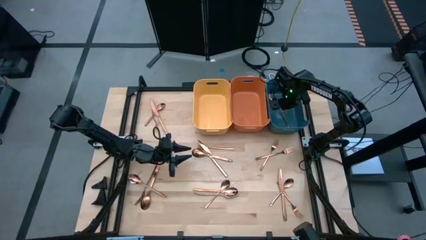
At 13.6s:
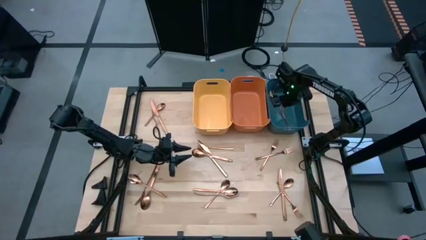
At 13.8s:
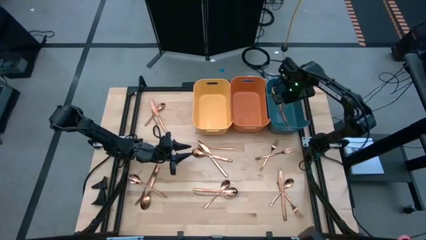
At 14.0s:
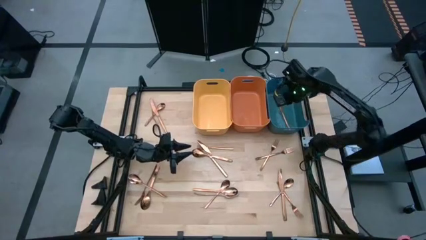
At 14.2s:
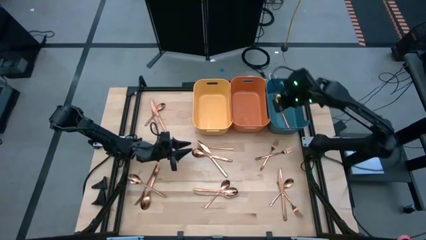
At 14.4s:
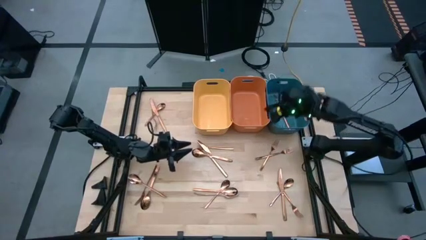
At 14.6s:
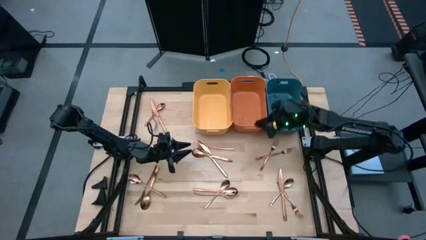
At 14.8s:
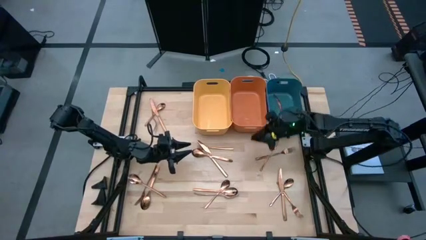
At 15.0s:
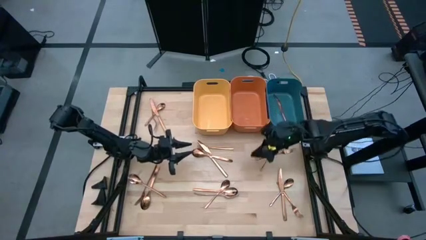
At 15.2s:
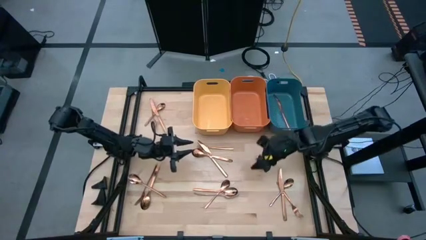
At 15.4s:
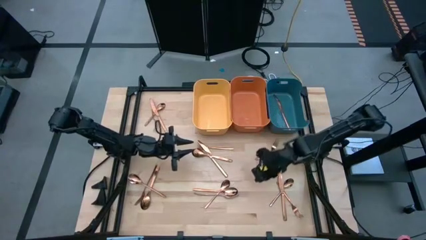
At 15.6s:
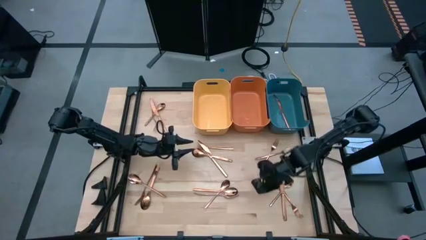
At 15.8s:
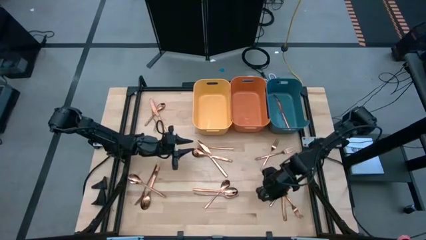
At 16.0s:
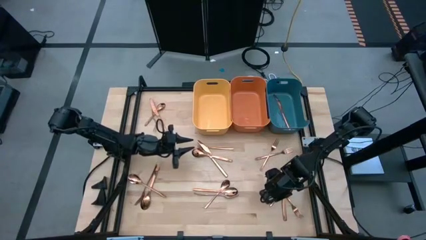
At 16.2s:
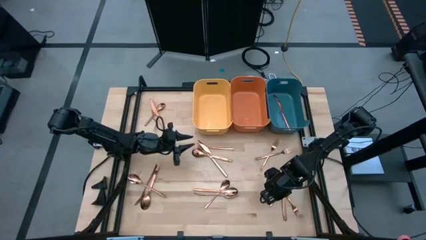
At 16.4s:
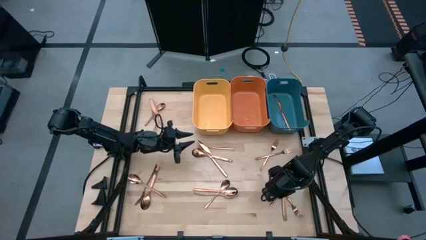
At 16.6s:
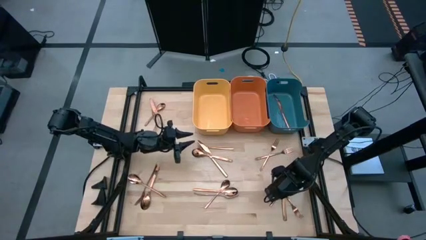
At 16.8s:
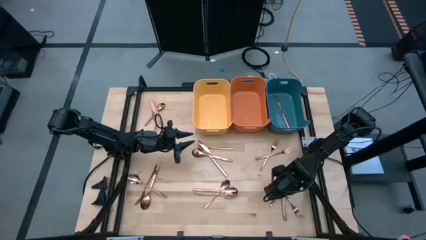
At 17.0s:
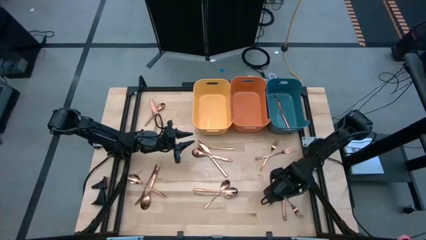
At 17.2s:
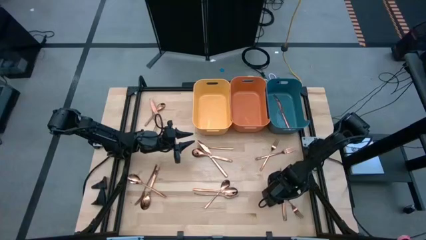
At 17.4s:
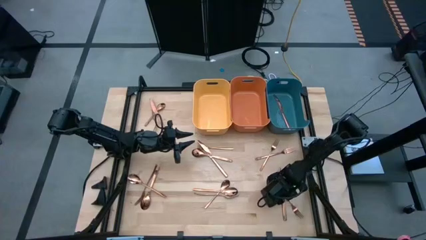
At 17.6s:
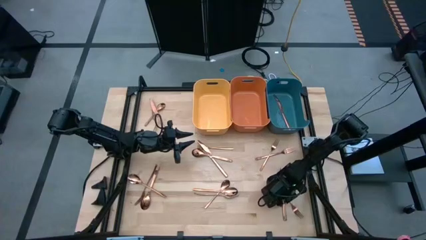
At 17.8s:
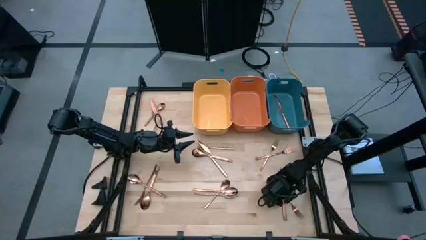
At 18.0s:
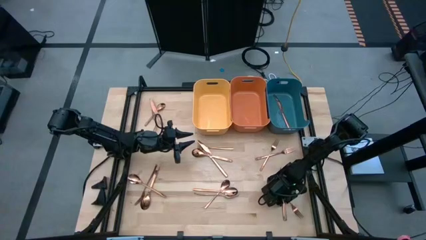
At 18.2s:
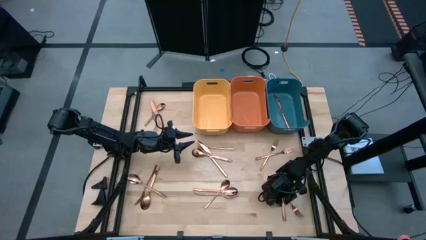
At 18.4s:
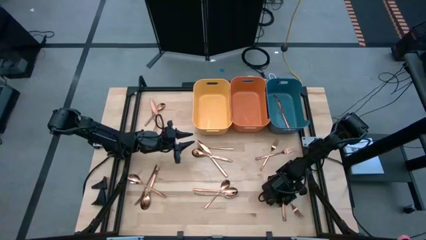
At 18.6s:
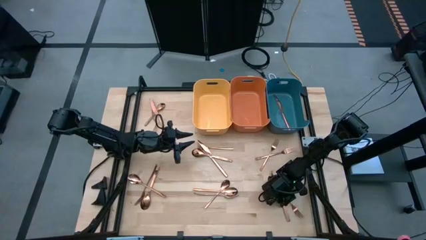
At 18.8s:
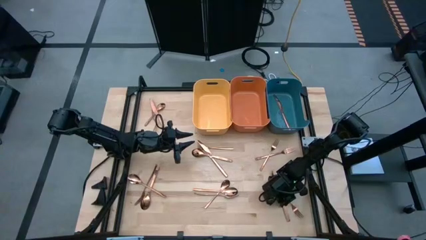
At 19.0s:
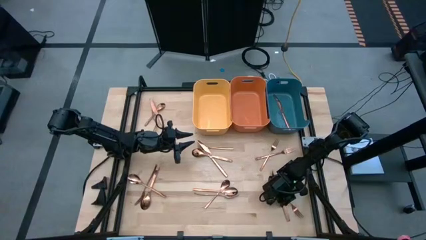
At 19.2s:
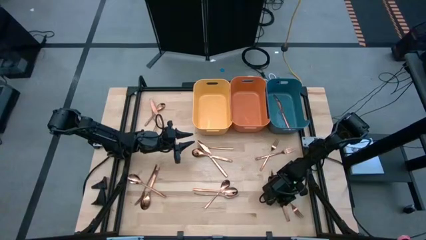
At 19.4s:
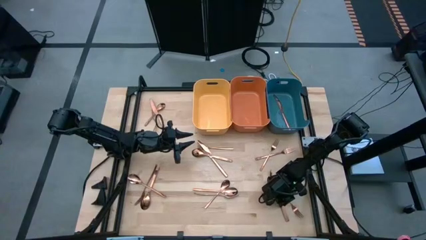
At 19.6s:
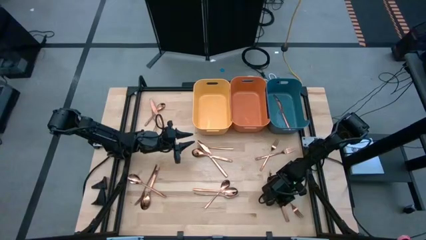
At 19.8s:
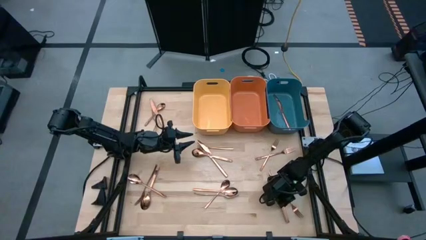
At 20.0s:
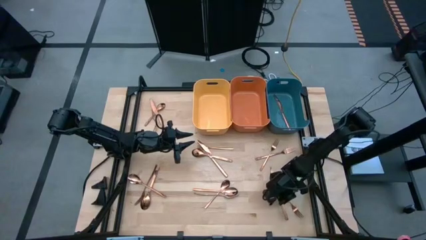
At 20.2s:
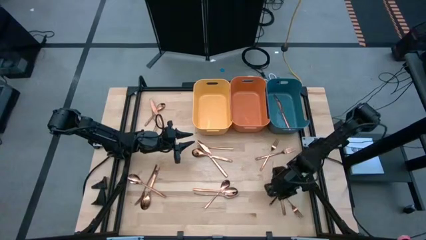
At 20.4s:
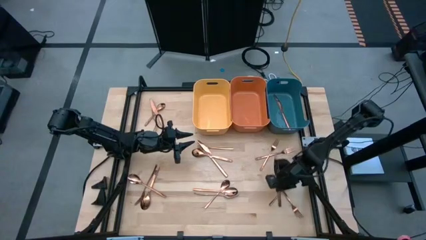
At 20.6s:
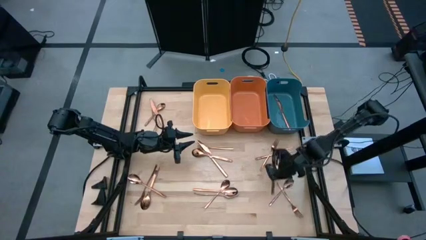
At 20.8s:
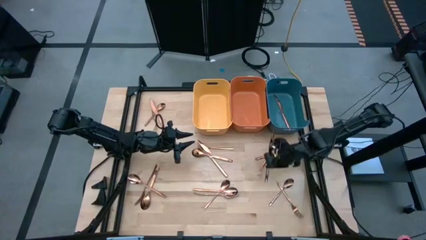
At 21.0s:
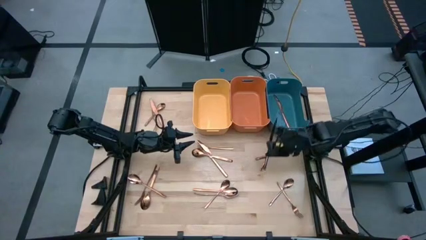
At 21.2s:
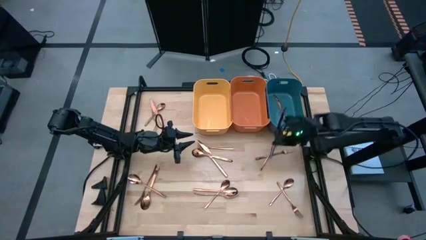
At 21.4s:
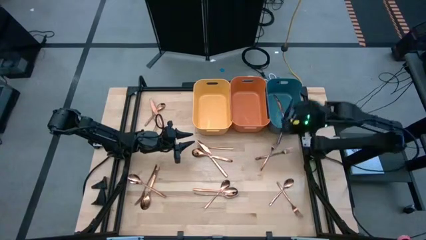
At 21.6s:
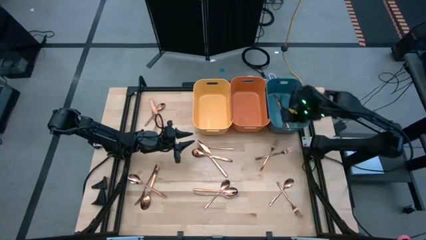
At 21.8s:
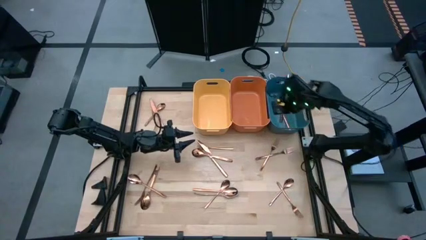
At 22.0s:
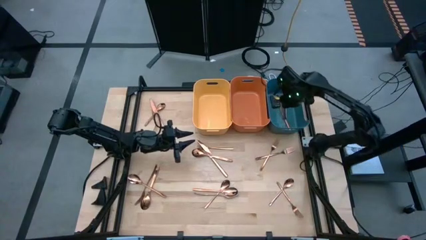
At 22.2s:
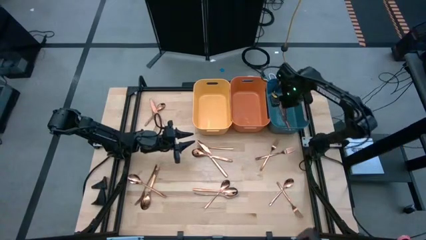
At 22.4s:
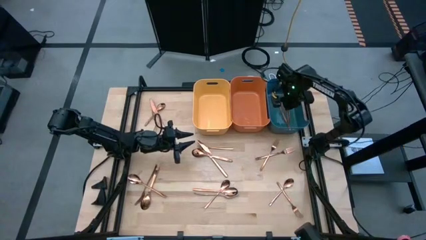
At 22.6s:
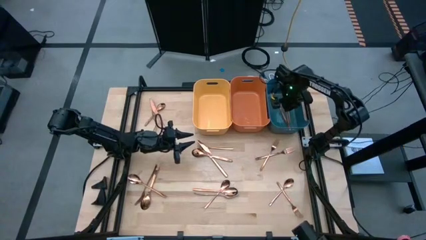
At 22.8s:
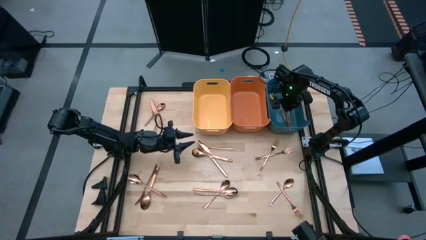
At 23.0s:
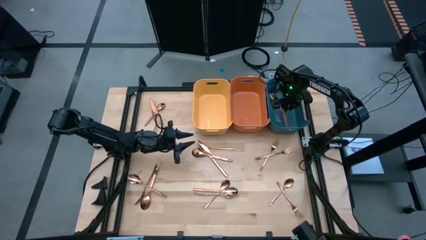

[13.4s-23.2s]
Task: Sort silverware
Put the copper knife into the blue bin

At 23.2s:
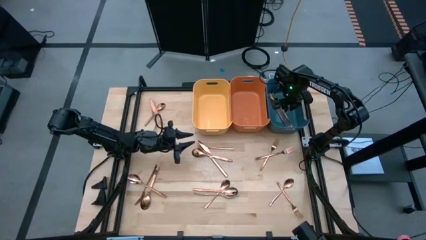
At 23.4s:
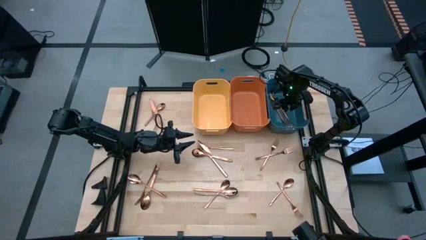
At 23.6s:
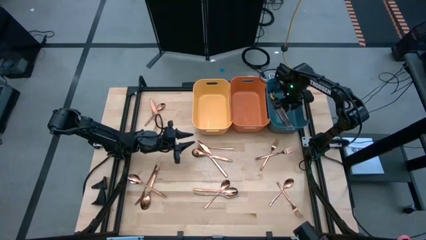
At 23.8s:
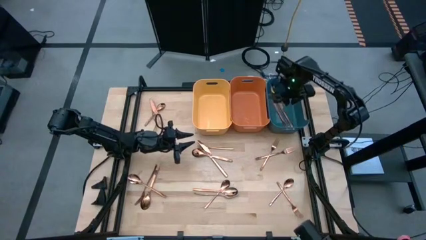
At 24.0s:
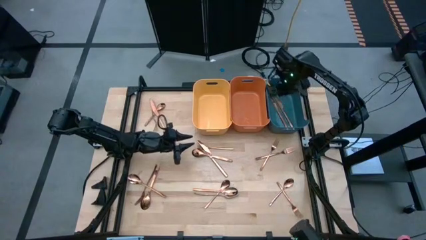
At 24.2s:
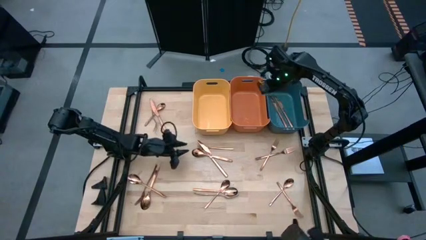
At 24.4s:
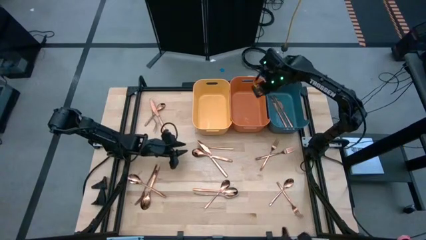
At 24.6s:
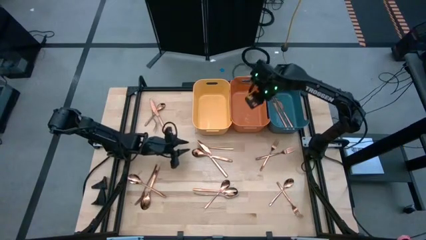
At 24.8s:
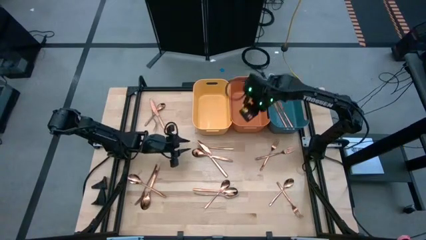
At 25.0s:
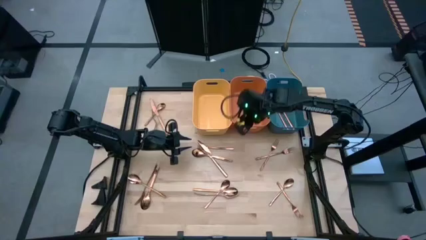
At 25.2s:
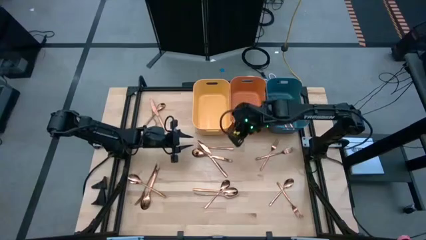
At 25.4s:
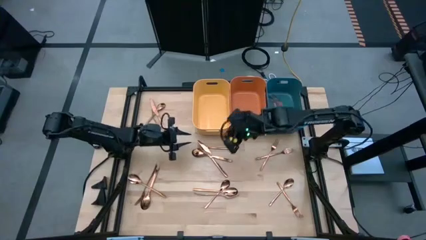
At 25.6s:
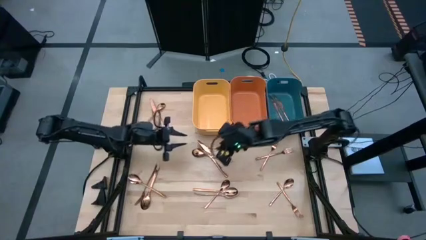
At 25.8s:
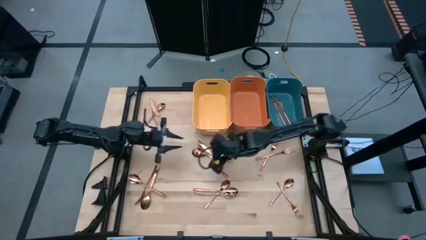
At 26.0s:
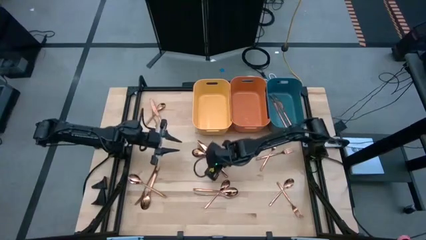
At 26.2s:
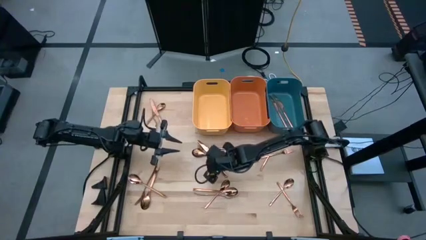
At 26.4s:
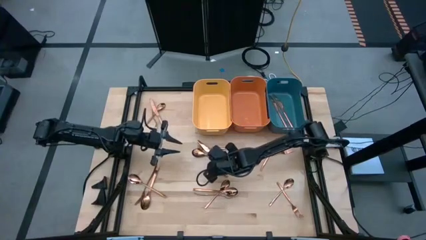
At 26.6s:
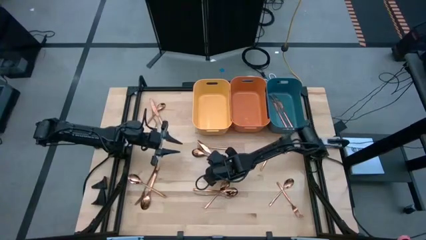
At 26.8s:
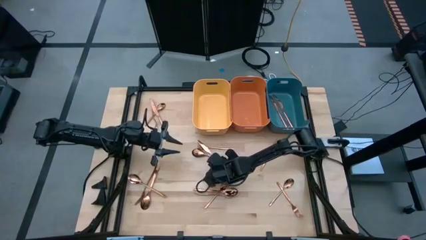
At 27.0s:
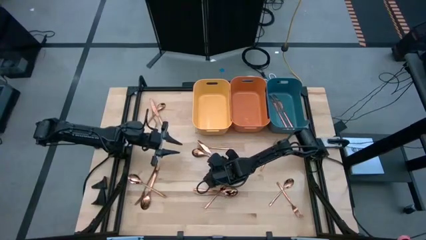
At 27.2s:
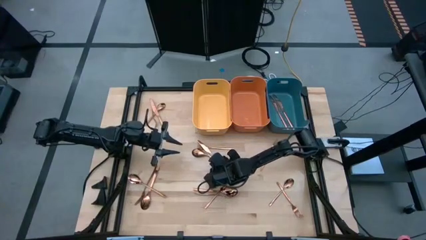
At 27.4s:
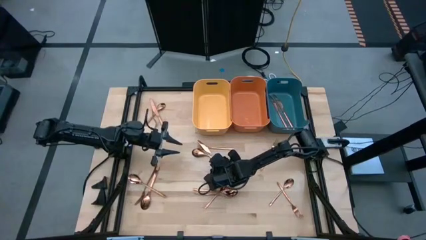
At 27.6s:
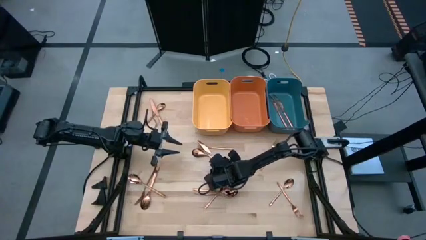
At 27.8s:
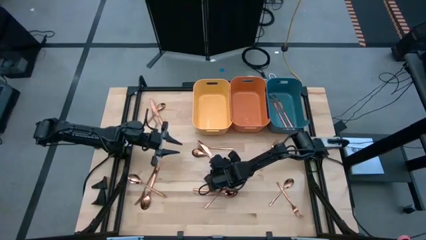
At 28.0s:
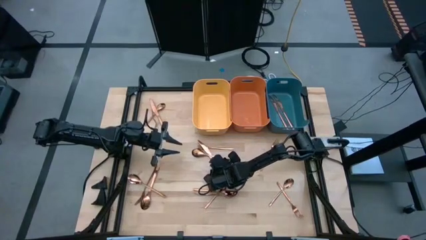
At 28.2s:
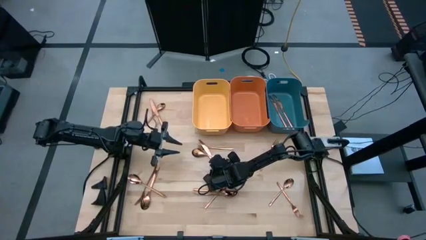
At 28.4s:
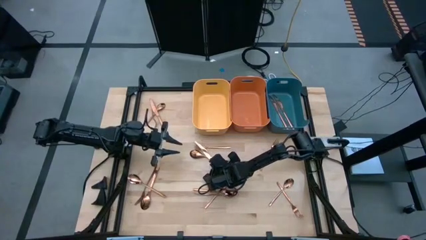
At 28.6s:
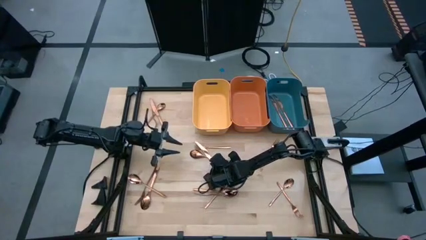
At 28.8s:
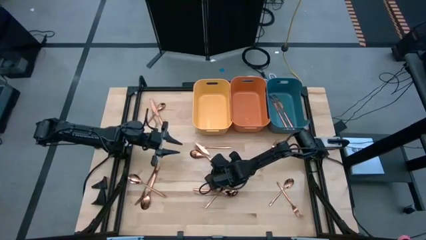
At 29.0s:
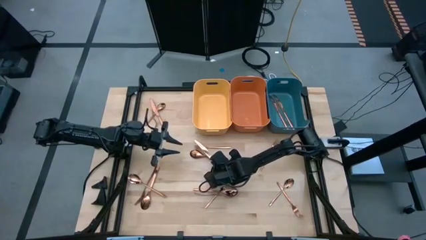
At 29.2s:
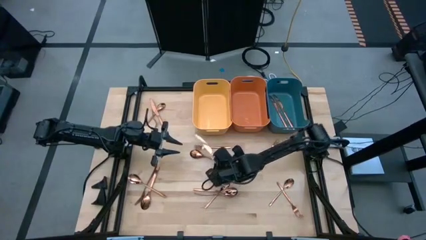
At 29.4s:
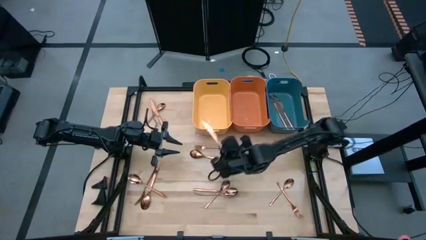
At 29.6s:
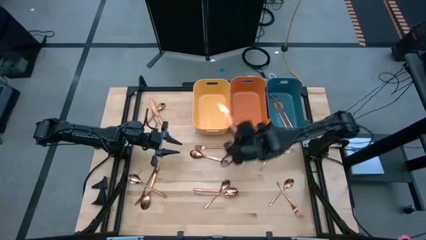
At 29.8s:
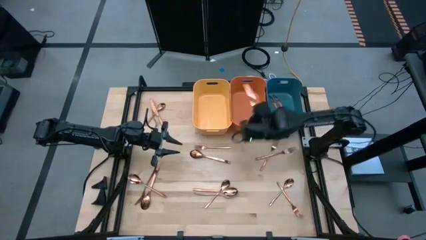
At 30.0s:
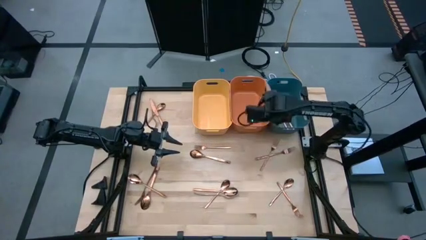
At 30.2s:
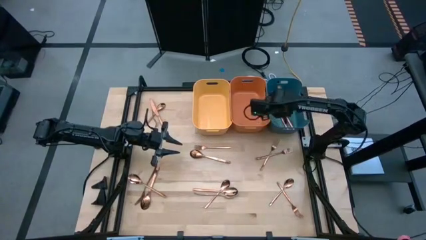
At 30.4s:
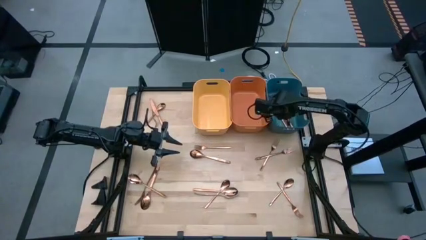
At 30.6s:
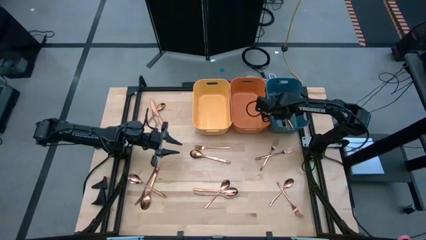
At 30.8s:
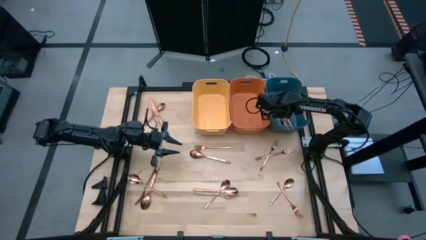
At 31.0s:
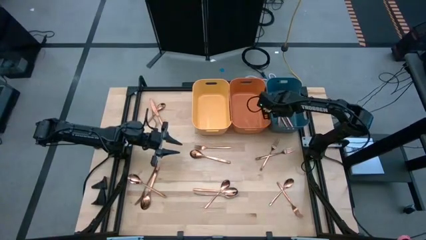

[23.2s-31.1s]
Put the copper knife into the blue bin
